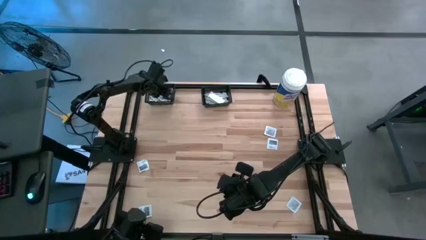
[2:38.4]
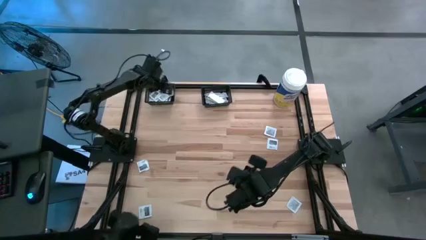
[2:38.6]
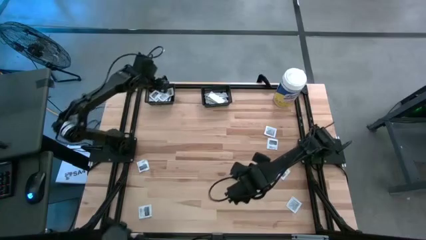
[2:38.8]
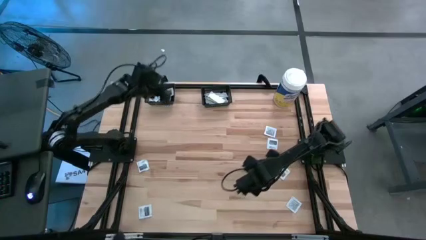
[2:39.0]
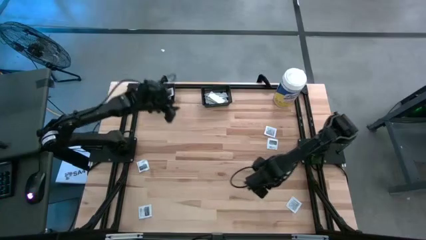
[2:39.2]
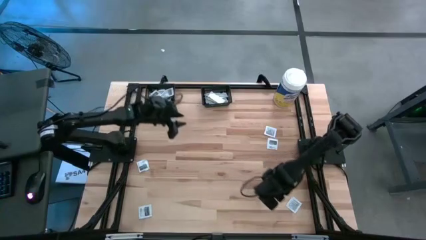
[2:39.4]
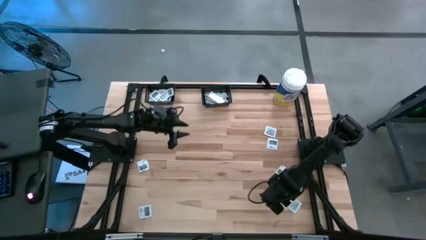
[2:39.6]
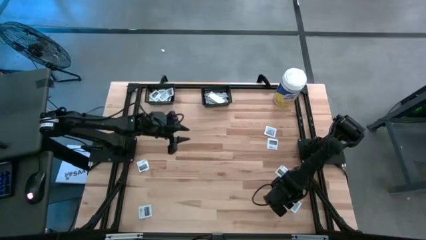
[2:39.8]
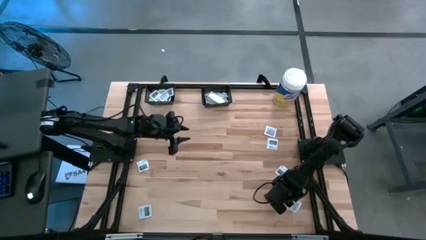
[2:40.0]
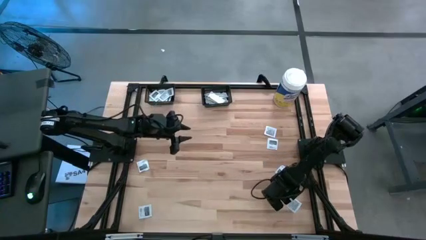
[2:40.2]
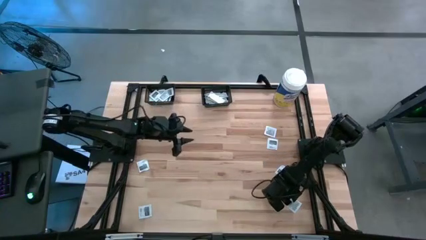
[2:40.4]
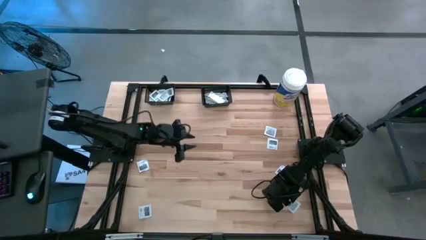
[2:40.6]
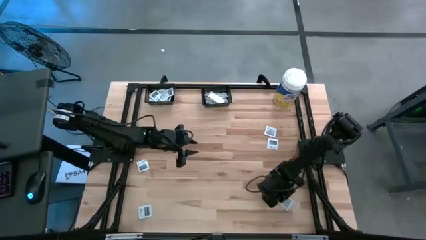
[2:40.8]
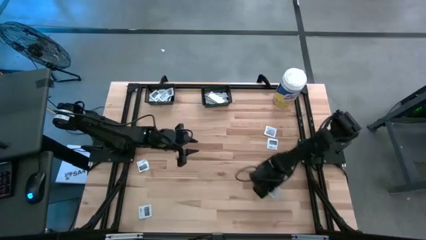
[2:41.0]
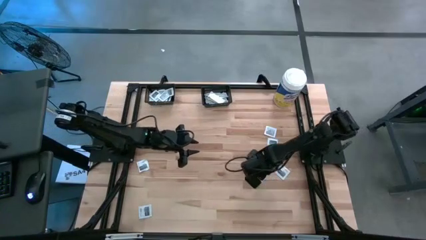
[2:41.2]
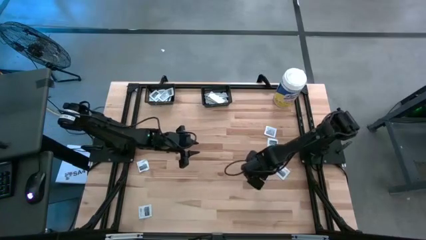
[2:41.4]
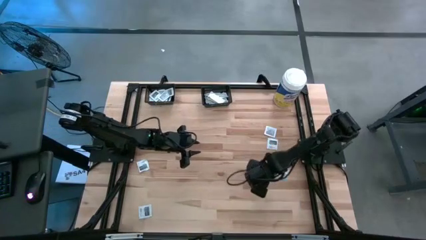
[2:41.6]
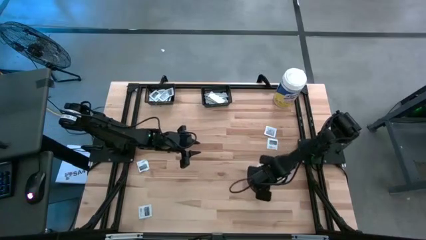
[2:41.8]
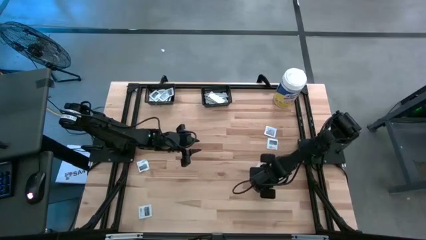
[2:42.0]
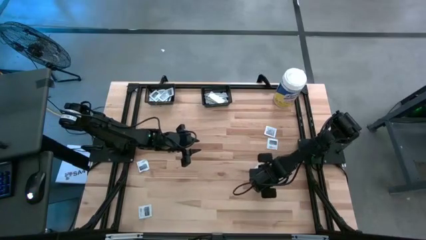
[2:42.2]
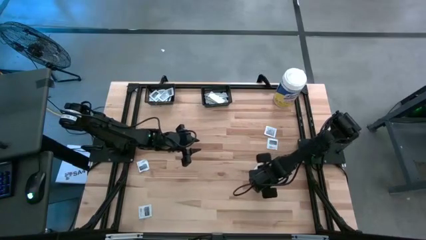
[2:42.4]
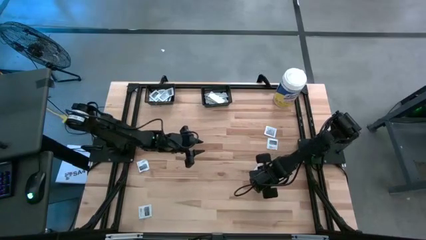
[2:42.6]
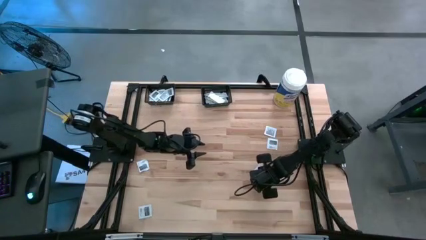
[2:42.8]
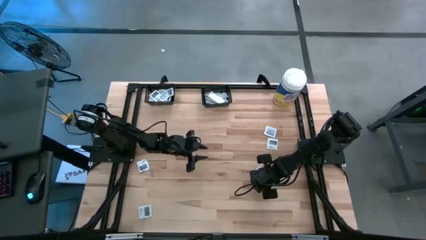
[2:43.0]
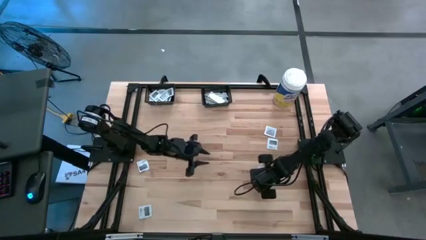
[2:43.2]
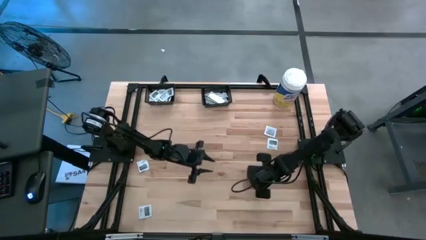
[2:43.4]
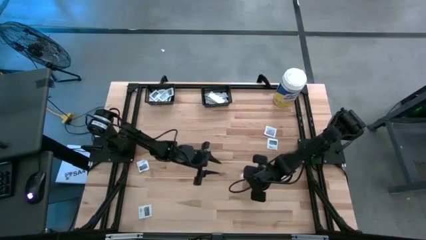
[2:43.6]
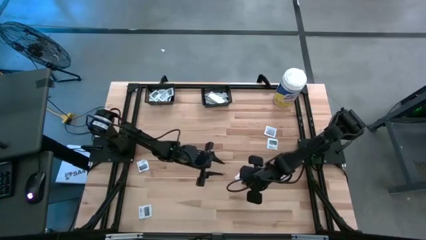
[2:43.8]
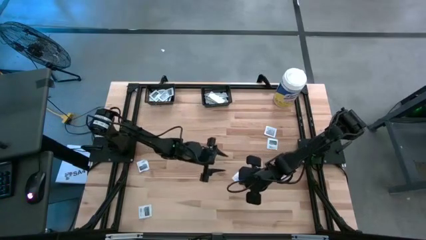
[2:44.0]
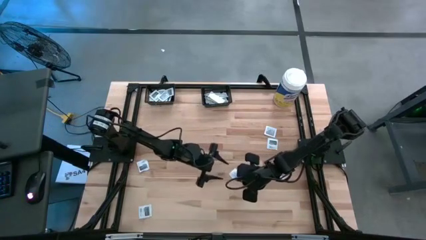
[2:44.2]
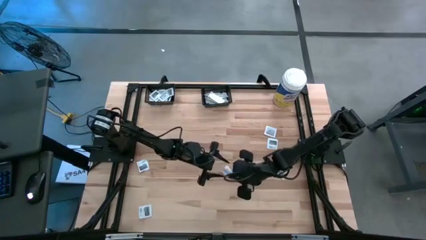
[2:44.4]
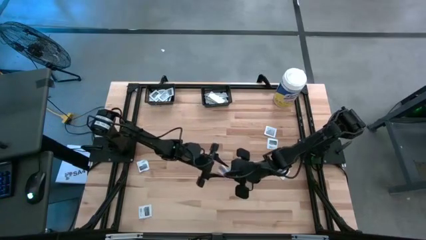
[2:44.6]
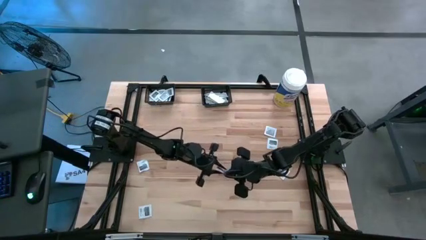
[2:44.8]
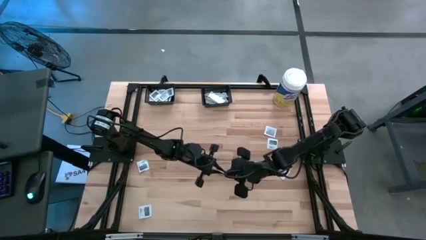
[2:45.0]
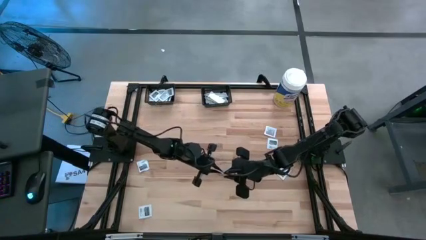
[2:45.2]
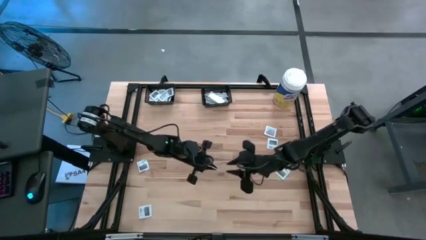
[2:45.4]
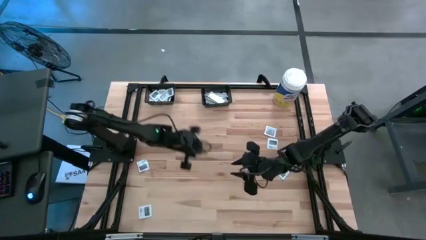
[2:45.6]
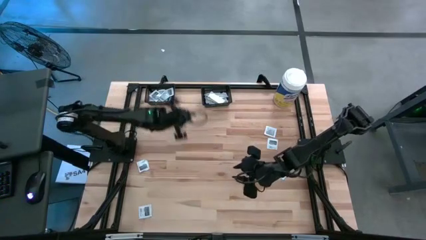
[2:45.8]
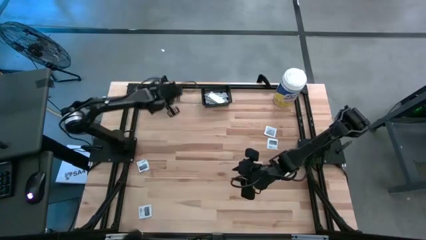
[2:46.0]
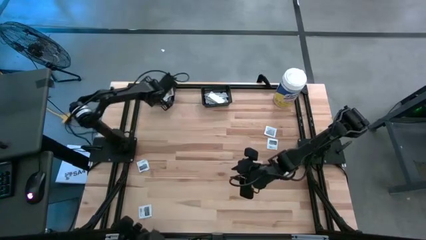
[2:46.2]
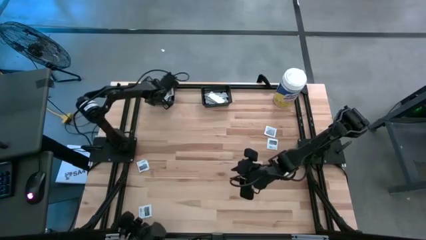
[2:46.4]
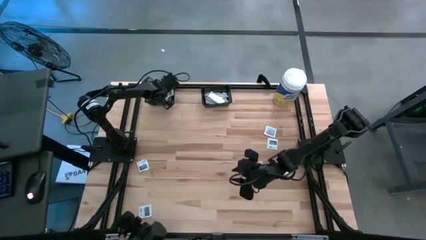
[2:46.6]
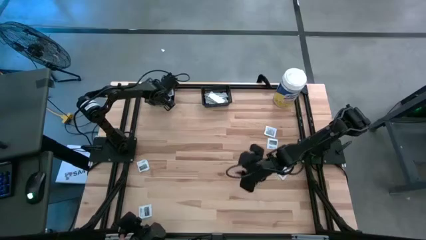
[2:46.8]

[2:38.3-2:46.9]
Task: Pick & Place First Aid Supplies
Put the gray towelette pack into the left black bin

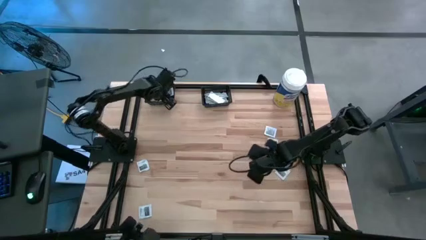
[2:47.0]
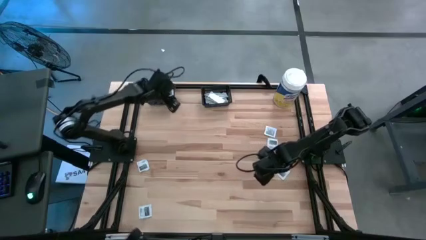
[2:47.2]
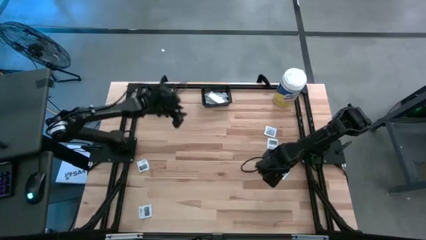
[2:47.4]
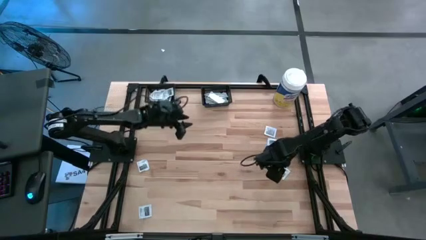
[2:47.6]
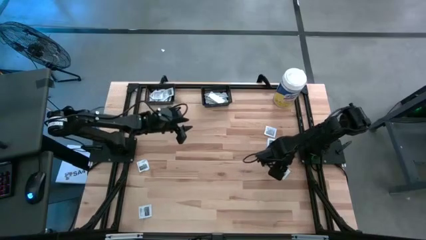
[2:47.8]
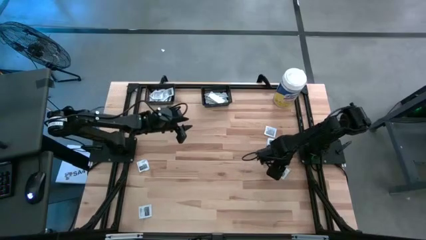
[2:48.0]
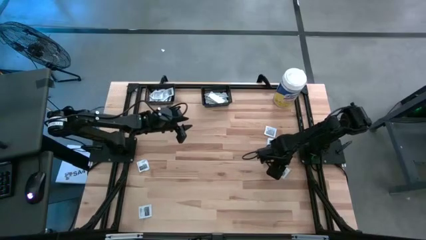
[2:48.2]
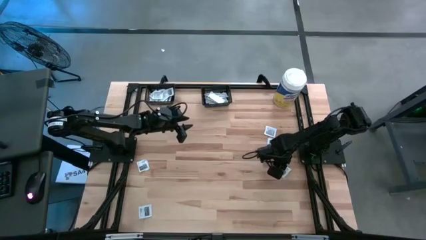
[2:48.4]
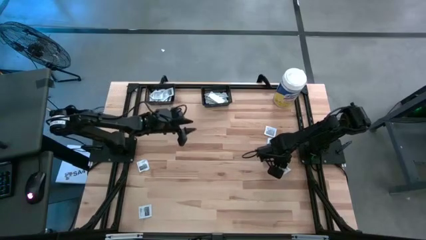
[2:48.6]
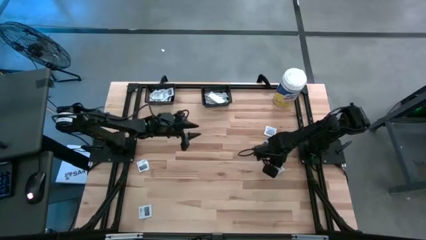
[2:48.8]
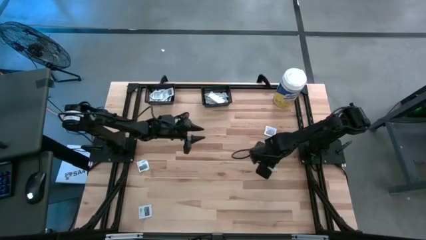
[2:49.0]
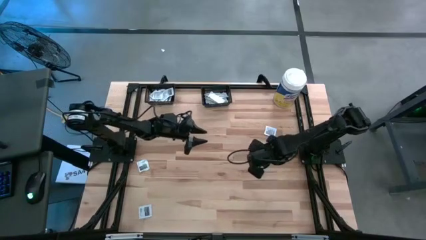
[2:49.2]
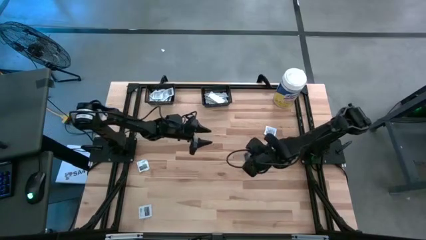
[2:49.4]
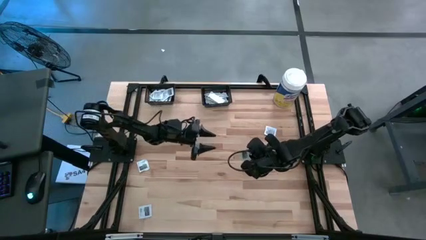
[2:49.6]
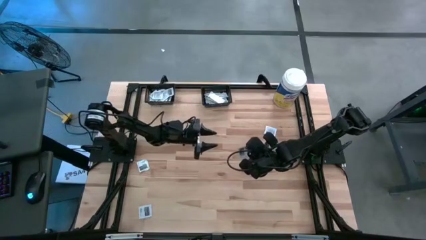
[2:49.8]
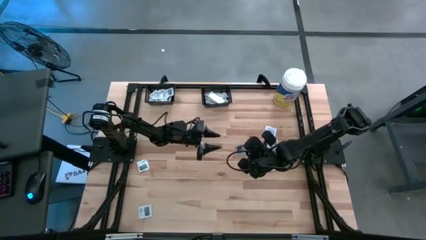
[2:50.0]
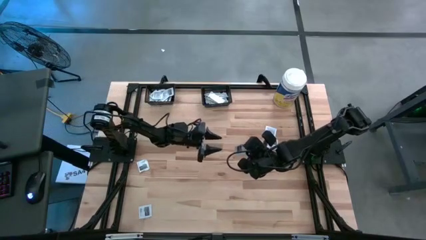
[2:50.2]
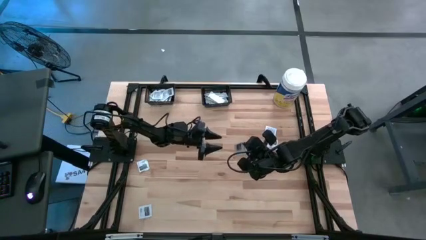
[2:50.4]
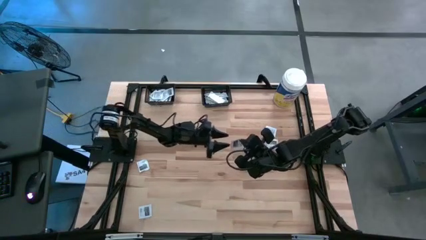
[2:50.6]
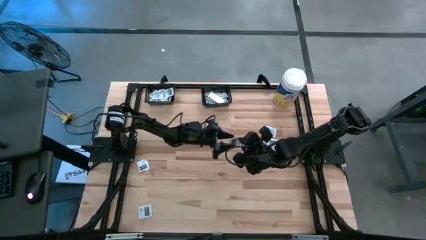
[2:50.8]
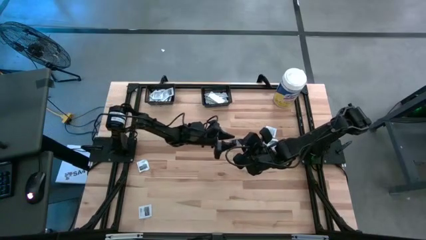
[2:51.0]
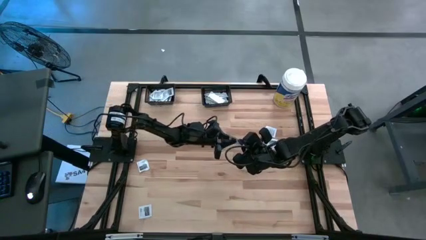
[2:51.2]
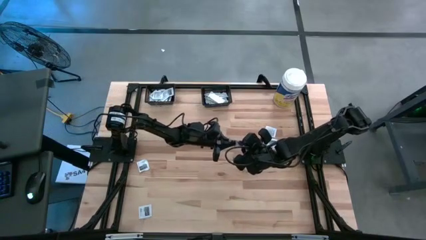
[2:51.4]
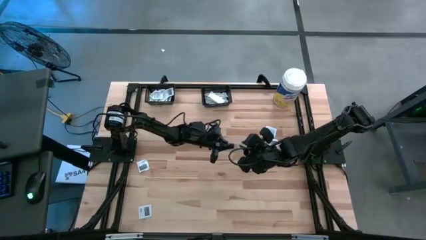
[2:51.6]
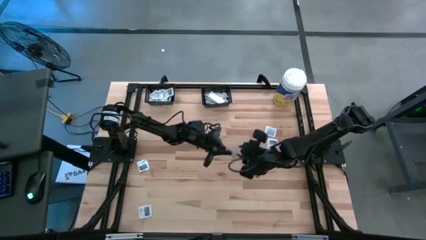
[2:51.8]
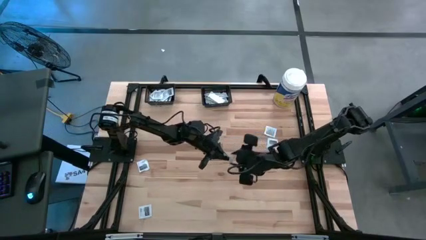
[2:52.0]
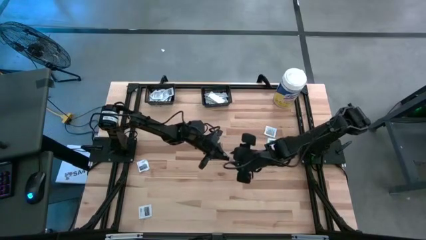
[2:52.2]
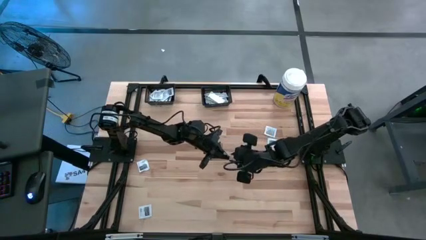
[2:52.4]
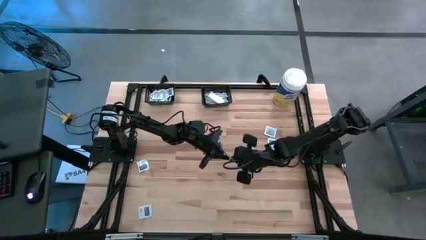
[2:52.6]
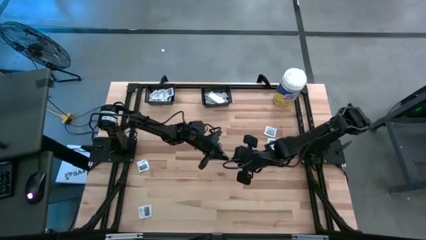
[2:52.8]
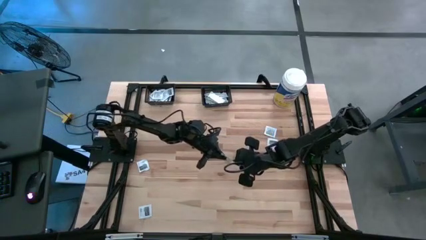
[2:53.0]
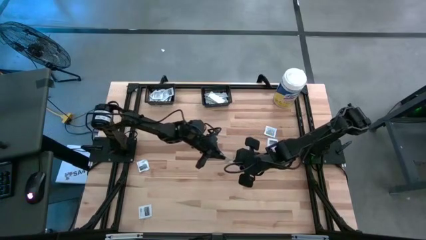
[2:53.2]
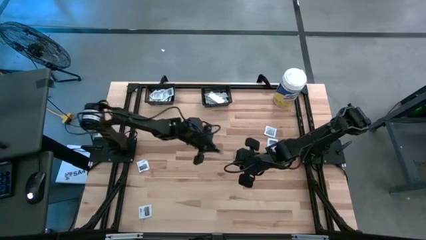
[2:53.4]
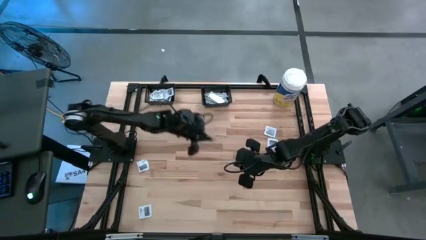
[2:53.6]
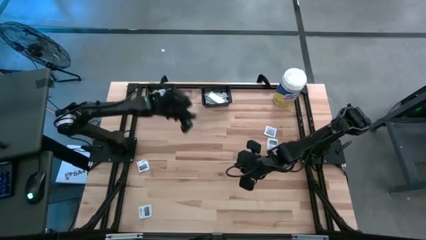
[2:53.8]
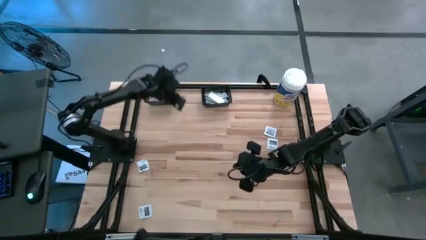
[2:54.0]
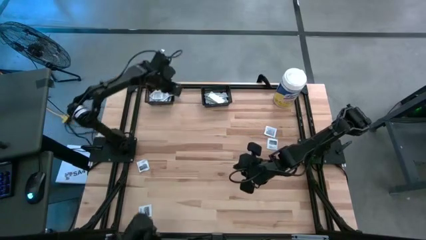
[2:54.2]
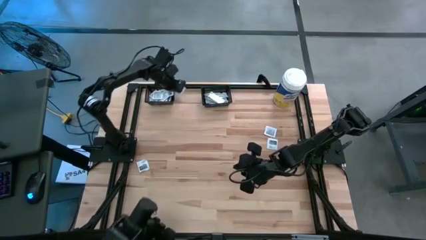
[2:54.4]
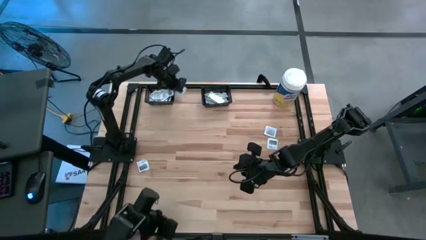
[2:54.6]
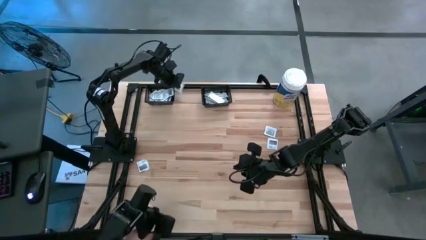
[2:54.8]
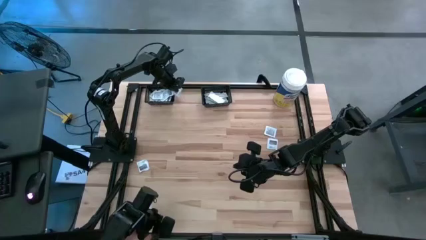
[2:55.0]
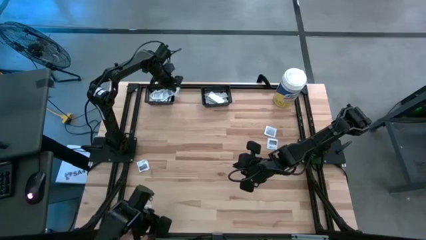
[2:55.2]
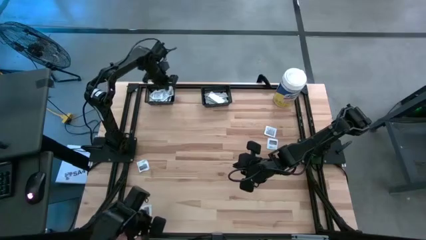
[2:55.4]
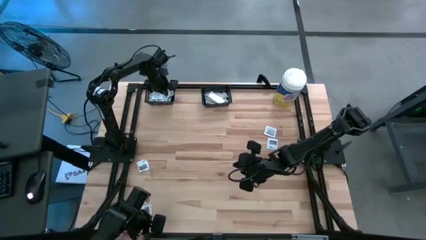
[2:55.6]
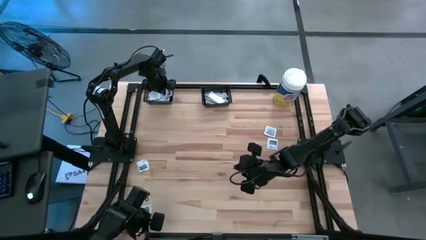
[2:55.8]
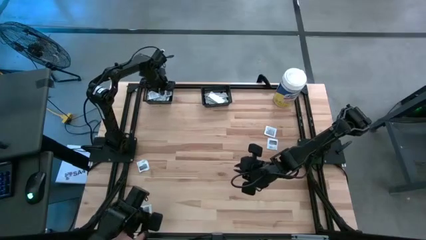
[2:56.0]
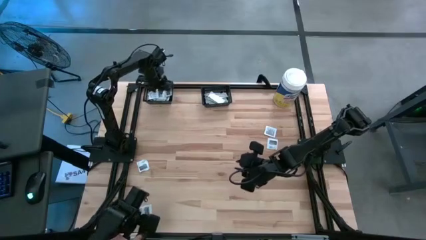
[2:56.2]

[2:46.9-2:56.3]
Put the gray towelette pack into the left black bin
